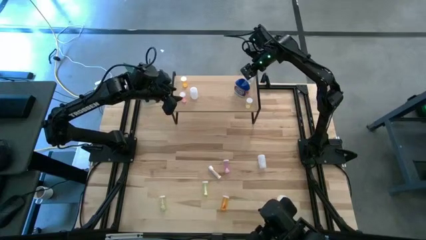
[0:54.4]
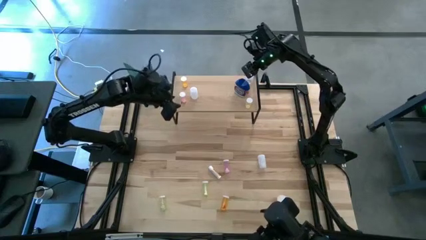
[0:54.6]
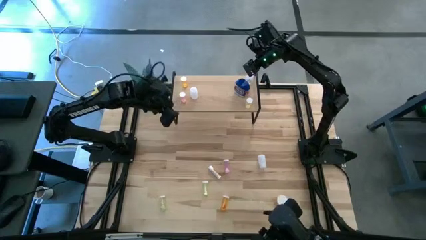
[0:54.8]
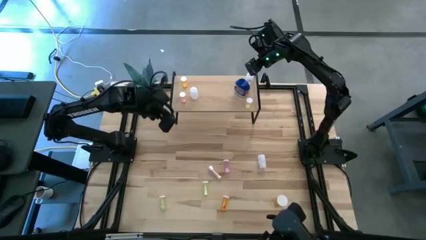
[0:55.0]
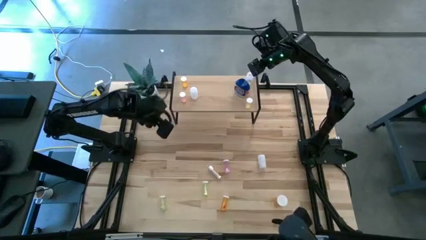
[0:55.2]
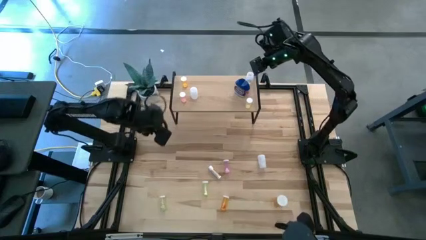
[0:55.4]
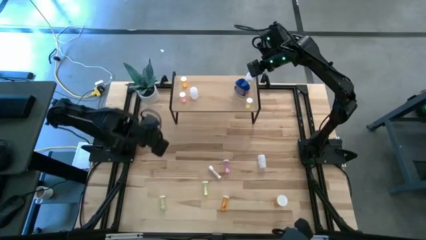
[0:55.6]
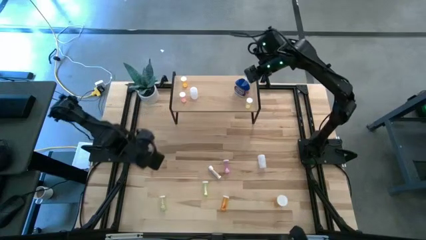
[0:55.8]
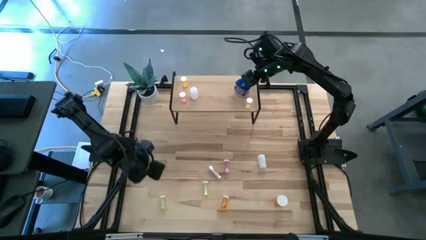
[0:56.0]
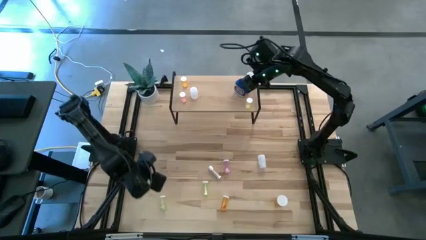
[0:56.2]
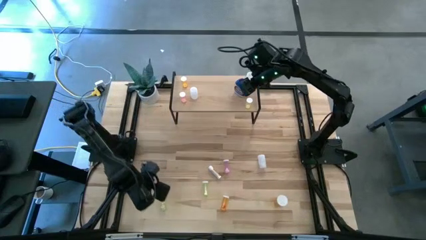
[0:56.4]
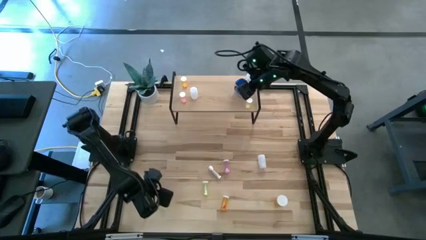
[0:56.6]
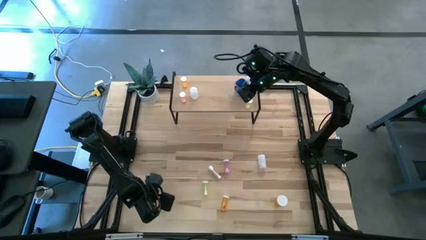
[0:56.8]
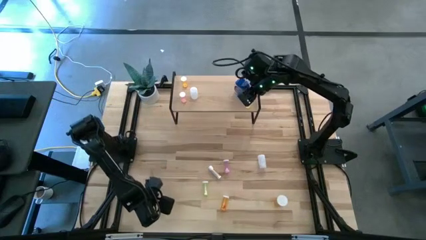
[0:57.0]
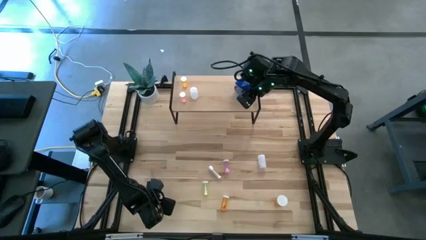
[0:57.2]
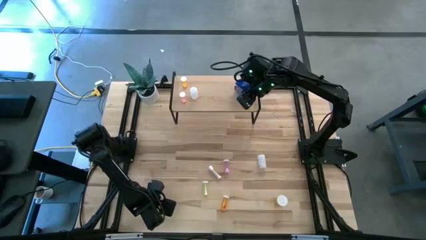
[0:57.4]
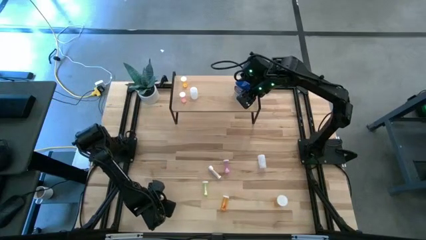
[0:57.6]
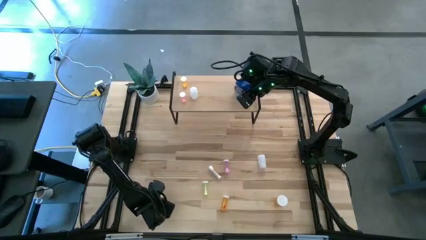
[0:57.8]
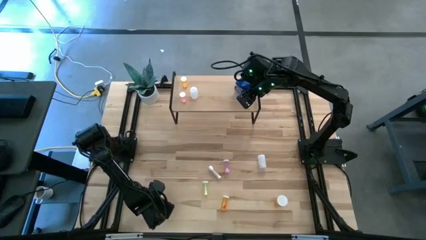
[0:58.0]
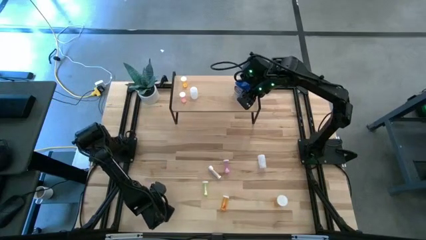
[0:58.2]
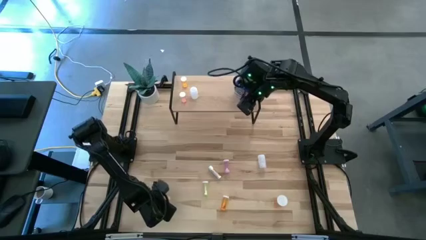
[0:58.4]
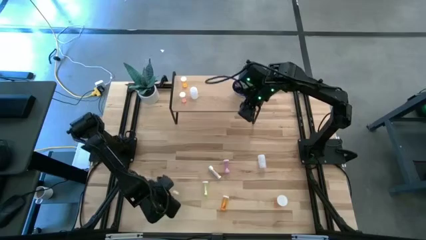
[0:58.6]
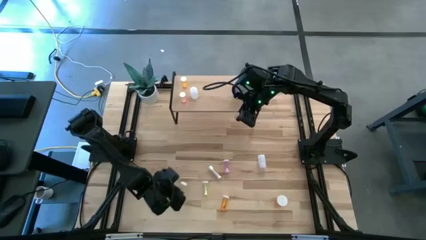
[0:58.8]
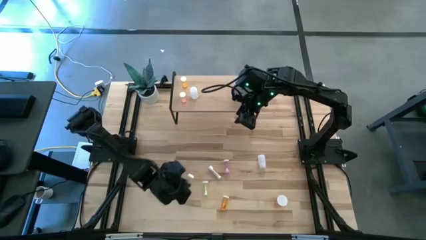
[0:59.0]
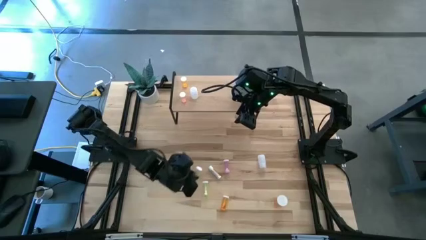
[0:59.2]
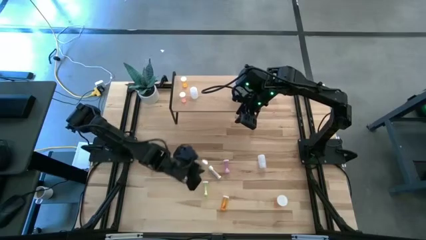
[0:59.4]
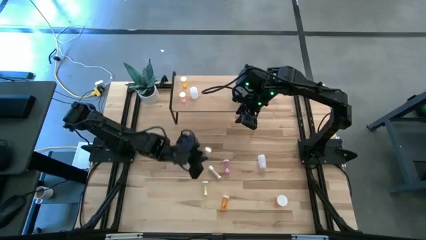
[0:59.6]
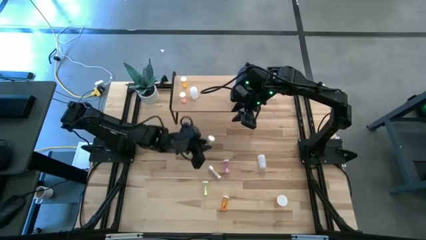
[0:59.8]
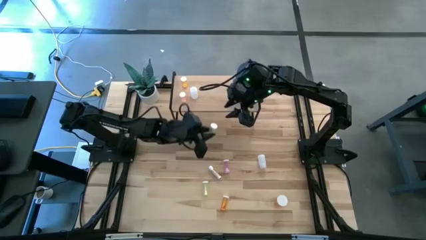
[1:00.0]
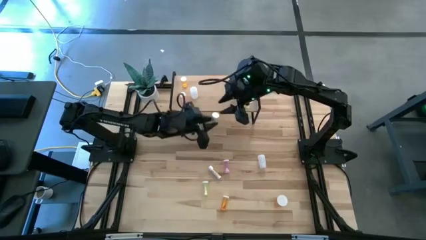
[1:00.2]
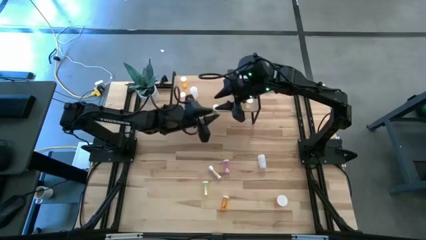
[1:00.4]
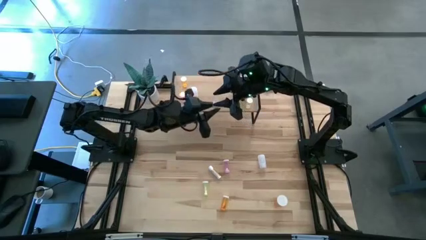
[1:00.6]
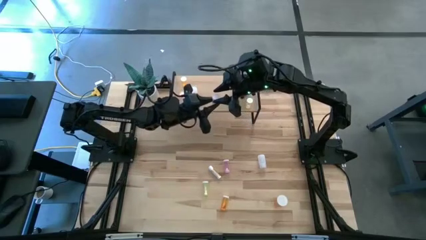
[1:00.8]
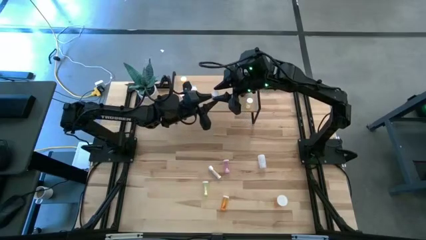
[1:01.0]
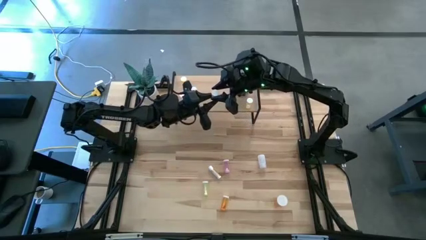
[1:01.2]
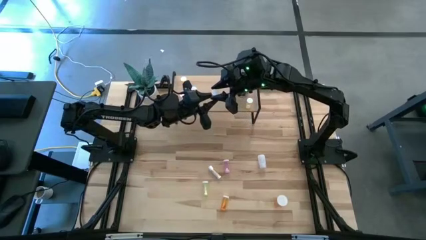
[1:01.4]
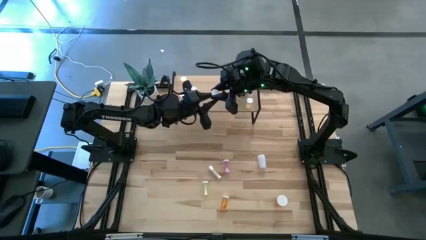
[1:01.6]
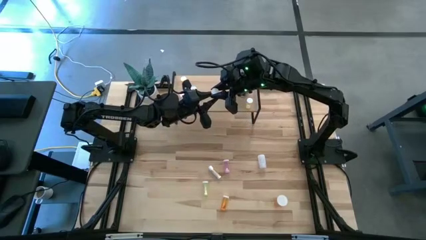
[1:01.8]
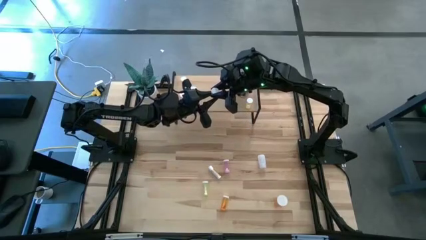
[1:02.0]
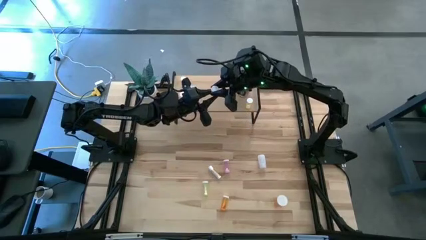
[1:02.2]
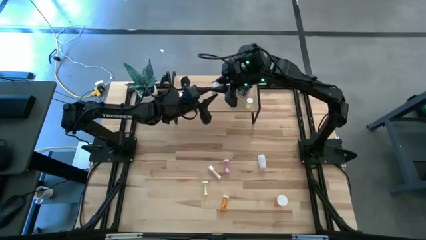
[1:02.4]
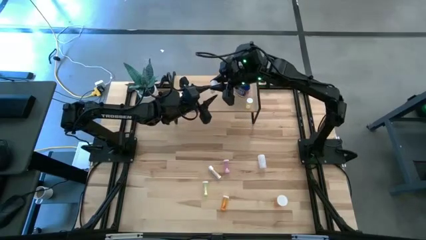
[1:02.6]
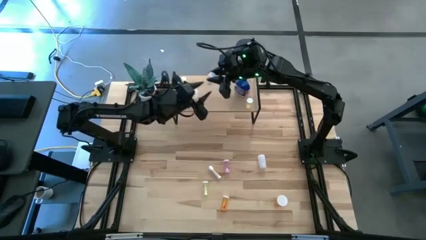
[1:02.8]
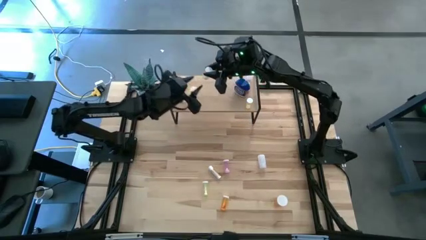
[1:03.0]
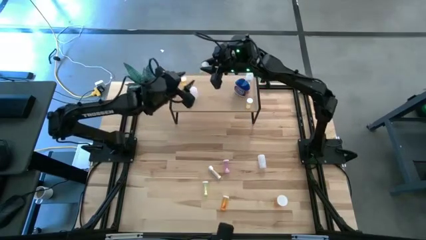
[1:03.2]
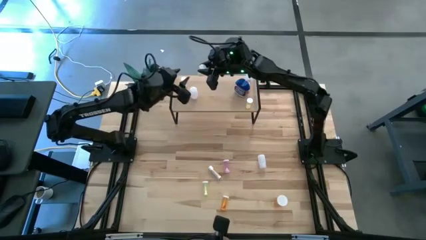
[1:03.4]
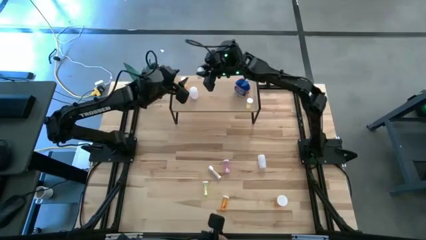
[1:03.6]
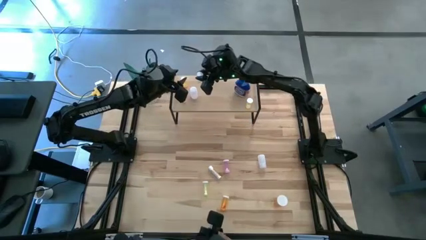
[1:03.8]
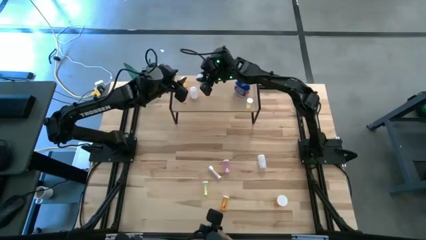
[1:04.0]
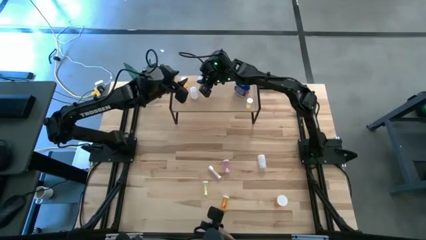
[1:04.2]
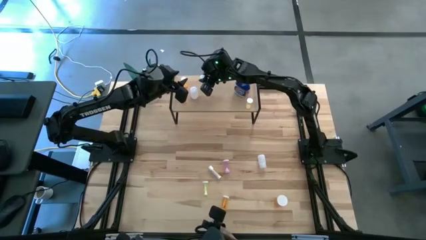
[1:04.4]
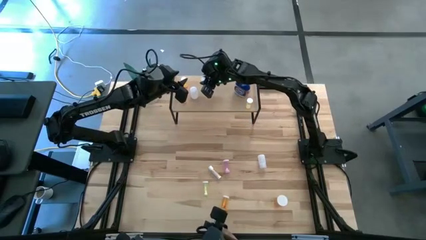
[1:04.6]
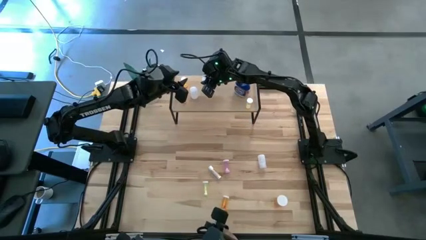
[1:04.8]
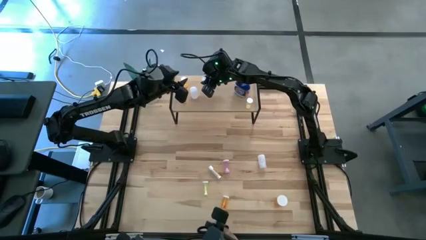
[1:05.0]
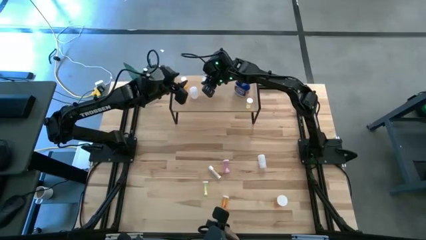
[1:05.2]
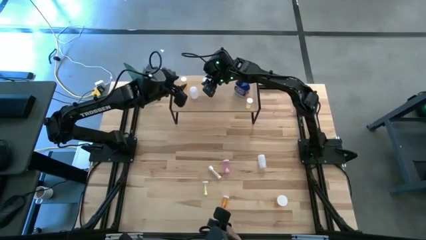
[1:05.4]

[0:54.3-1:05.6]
Task: Pick and place medicine bottles onto shelf by color
Put the left yellow pill bottle on the shelf

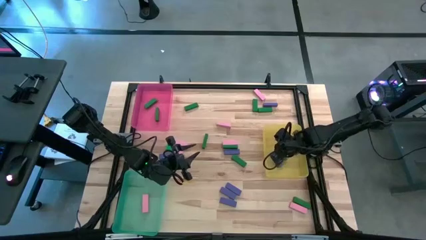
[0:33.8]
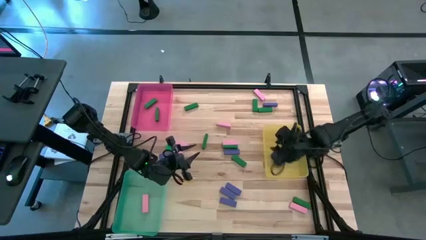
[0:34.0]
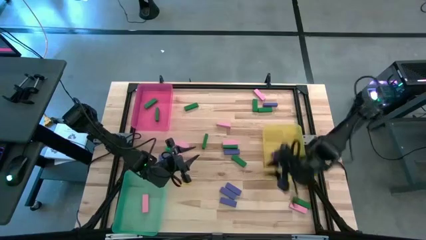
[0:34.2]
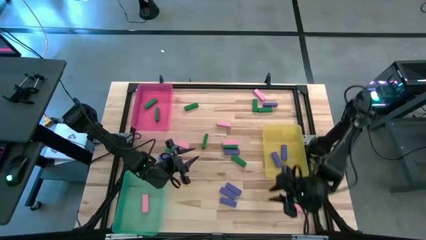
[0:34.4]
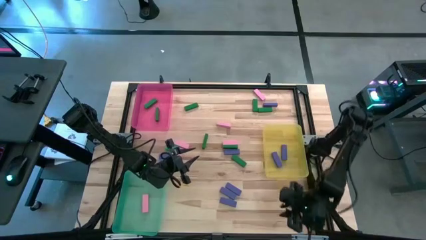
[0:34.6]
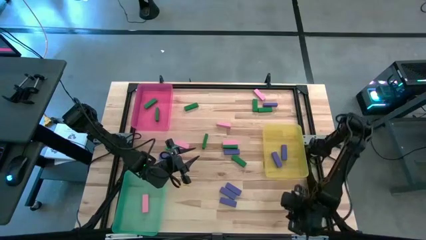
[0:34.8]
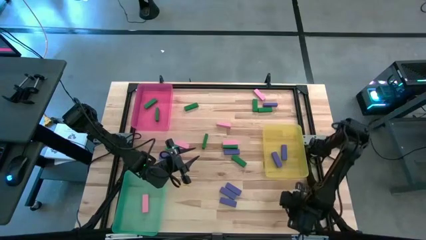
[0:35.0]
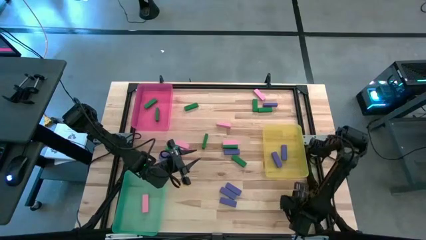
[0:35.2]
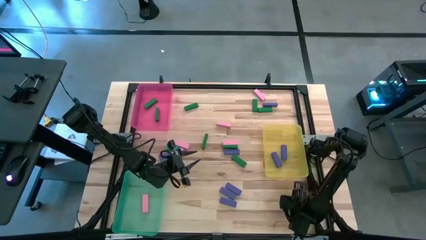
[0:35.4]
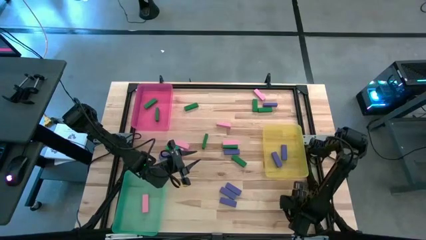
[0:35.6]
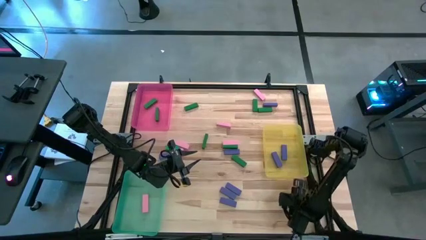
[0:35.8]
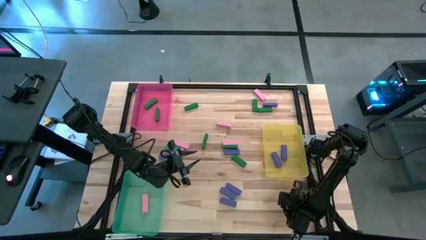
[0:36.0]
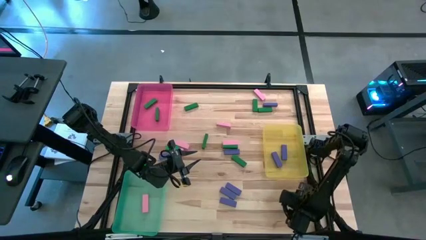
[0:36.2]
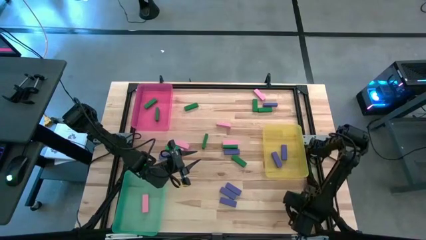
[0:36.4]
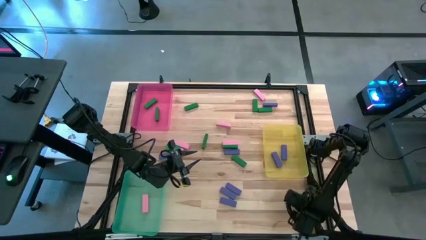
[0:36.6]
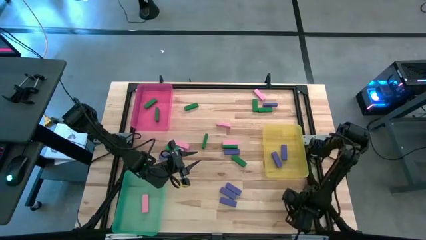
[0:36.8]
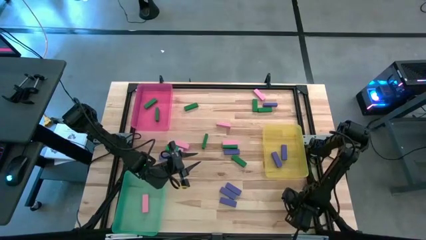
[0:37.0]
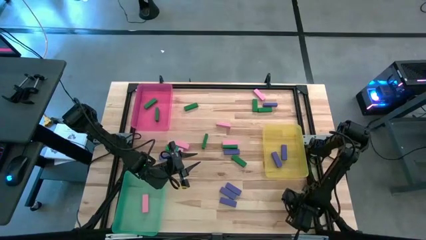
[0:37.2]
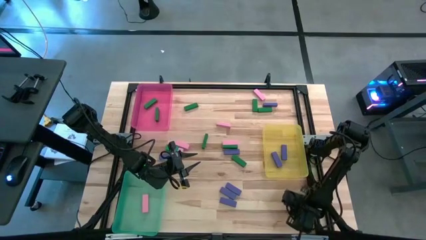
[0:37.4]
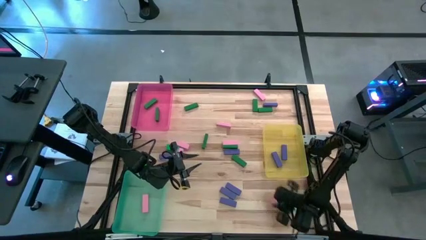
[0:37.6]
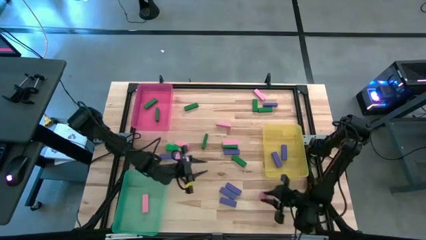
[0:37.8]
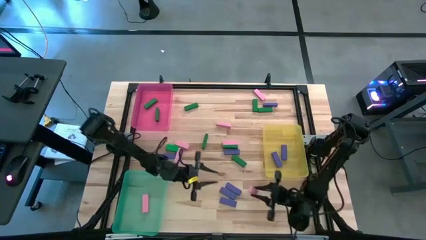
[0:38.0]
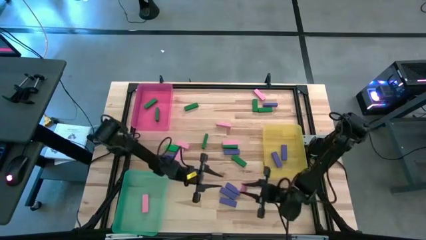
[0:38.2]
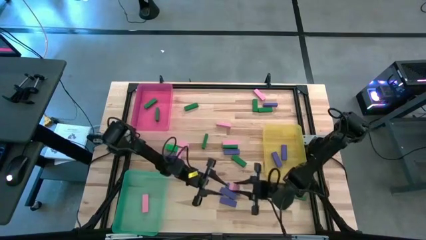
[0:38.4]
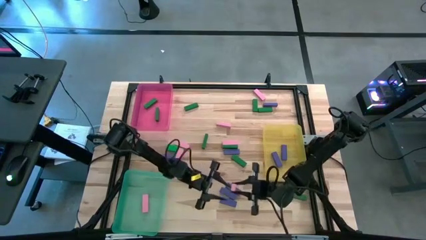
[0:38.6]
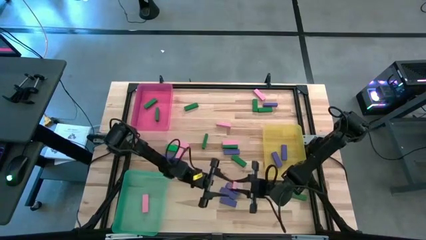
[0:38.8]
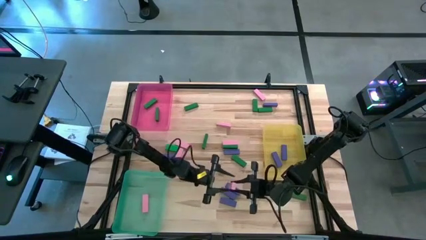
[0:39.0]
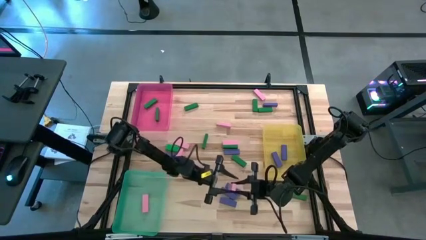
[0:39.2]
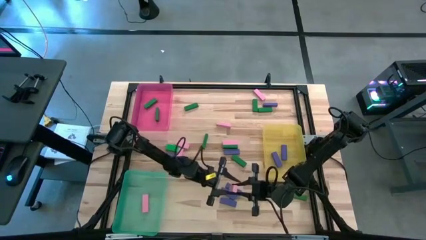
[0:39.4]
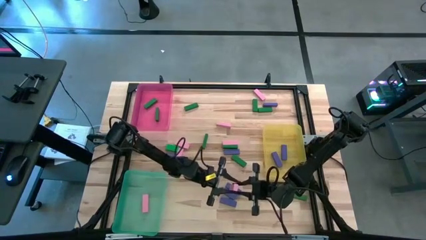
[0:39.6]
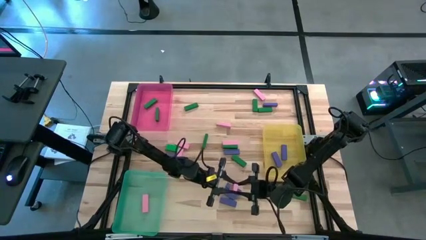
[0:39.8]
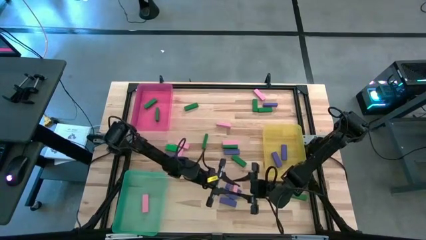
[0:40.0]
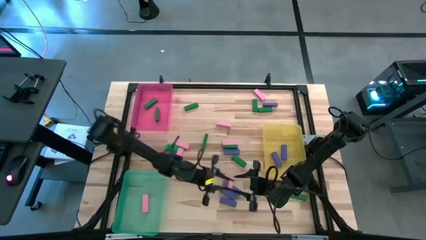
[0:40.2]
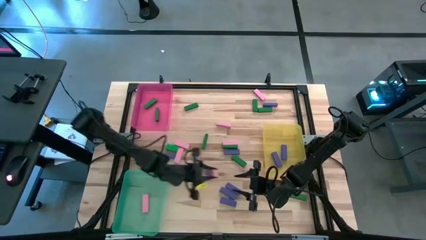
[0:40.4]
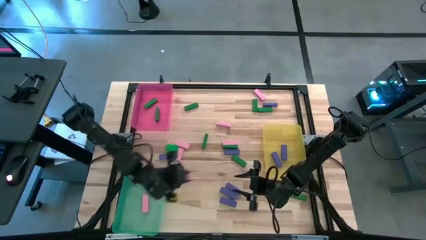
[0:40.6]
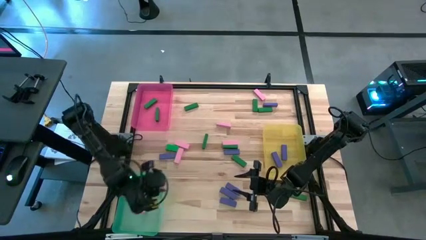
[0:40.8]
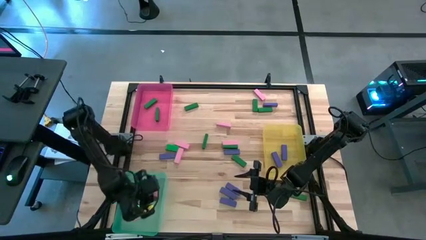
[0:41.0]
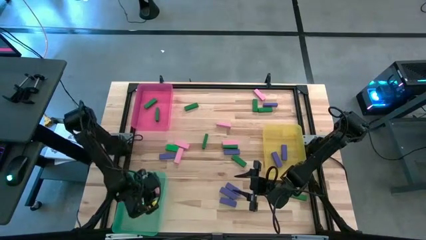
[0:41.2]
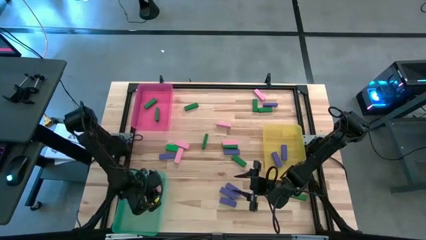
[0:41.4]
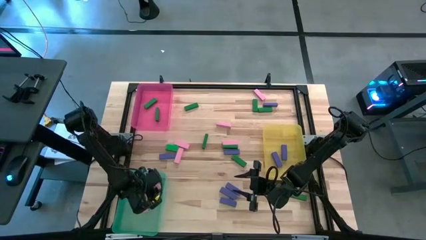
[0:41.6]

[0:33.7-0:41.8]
Task: Sort blocks
Put the pink block into the green bin
